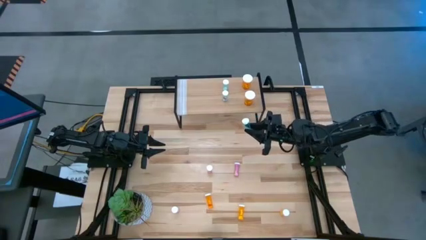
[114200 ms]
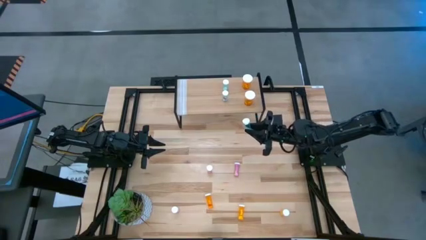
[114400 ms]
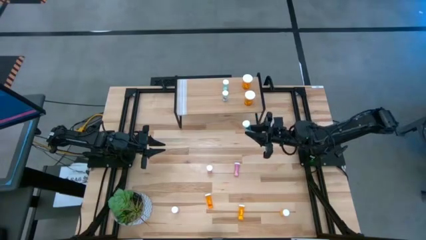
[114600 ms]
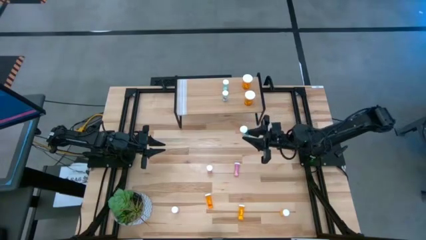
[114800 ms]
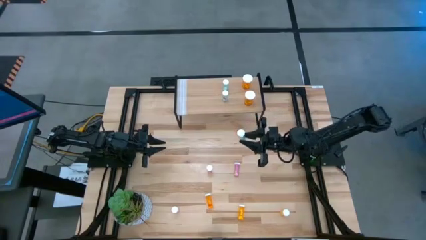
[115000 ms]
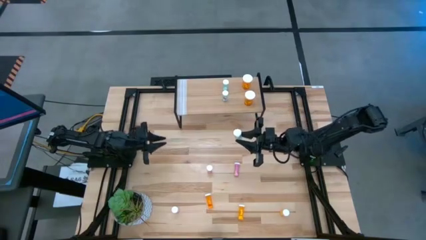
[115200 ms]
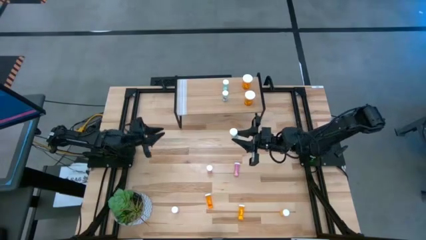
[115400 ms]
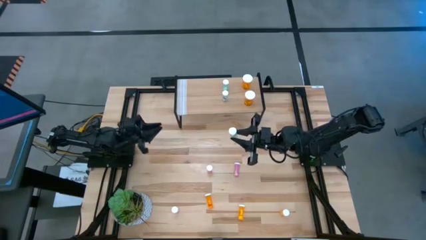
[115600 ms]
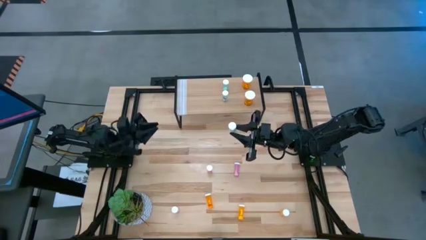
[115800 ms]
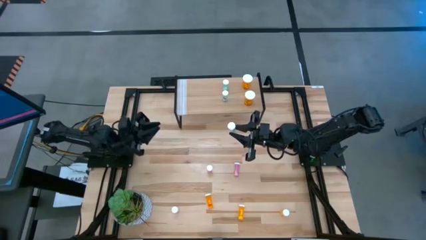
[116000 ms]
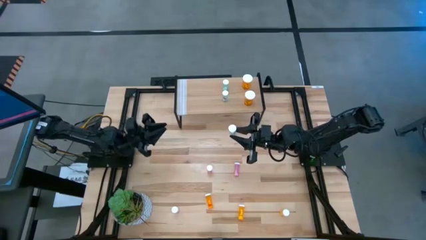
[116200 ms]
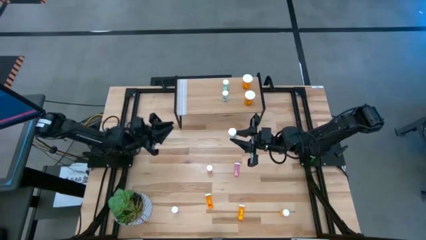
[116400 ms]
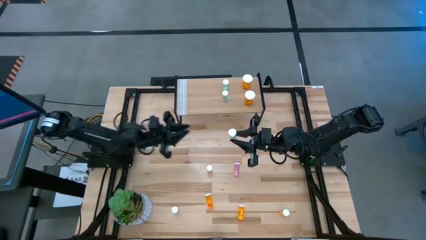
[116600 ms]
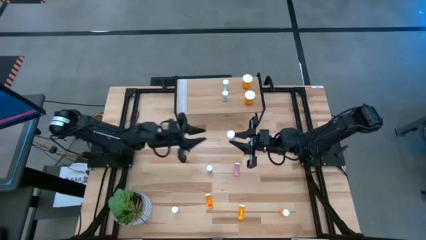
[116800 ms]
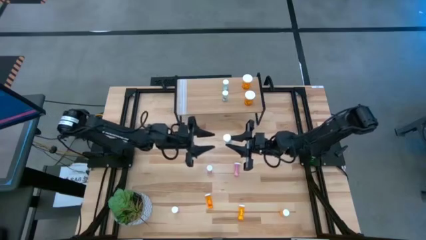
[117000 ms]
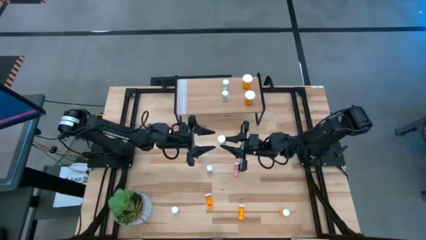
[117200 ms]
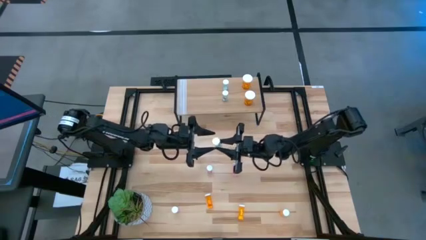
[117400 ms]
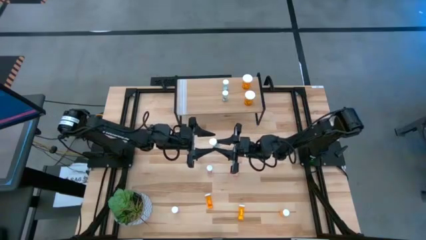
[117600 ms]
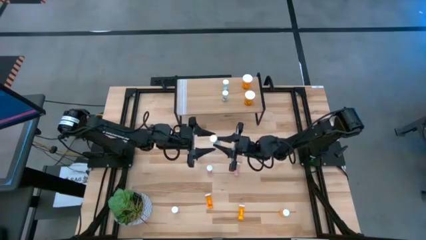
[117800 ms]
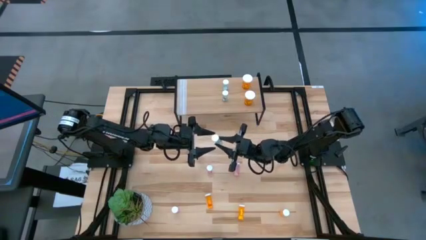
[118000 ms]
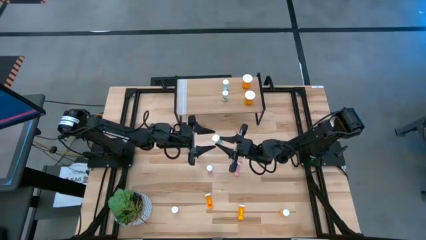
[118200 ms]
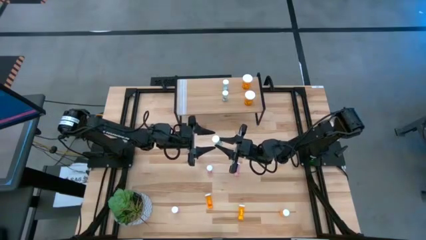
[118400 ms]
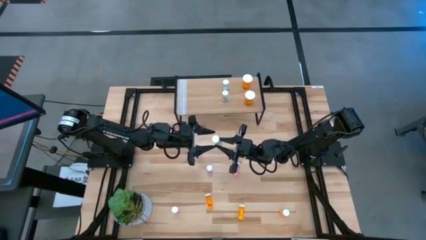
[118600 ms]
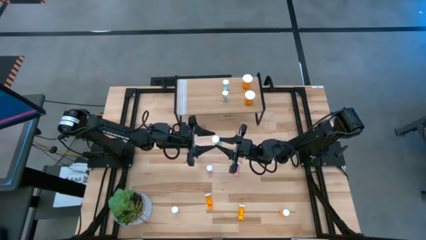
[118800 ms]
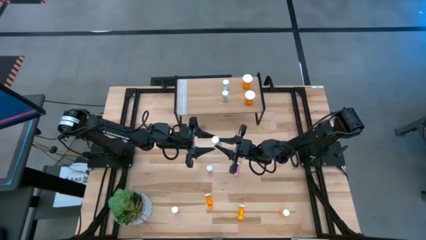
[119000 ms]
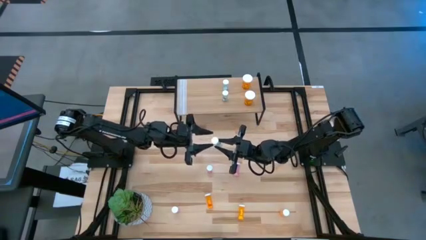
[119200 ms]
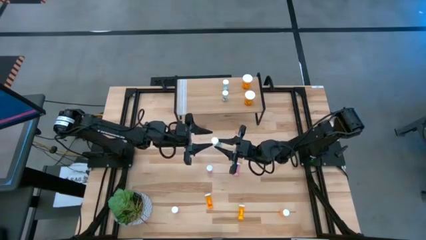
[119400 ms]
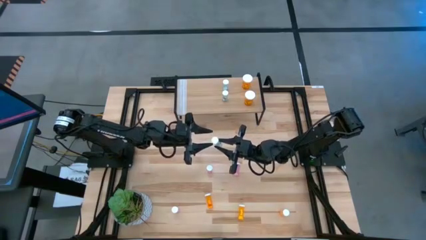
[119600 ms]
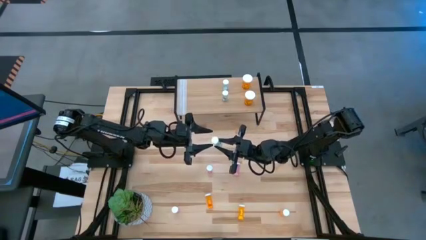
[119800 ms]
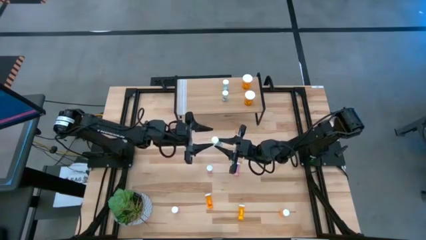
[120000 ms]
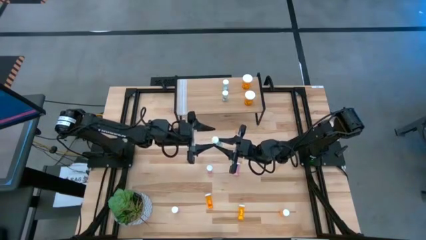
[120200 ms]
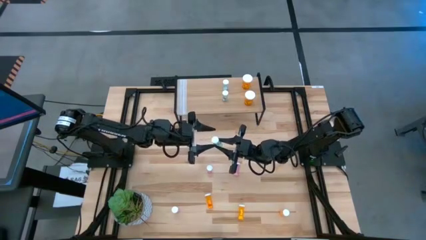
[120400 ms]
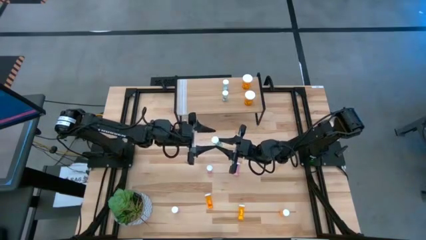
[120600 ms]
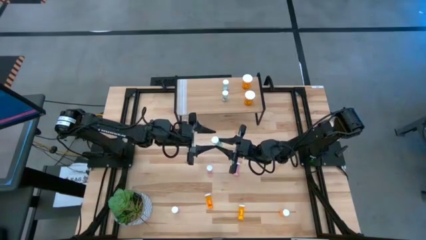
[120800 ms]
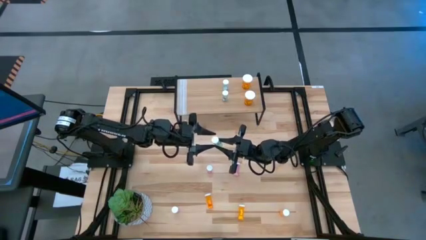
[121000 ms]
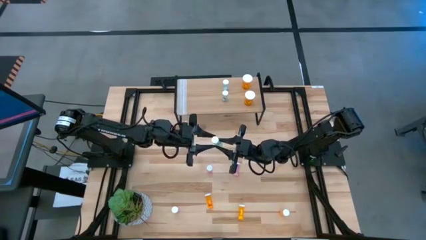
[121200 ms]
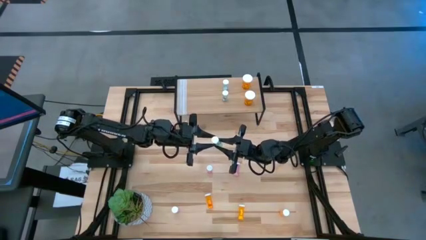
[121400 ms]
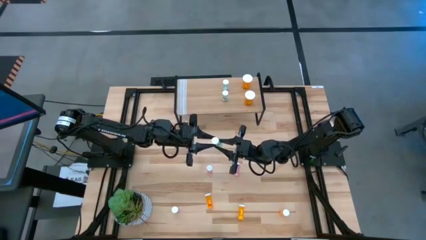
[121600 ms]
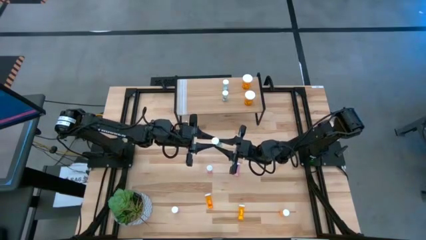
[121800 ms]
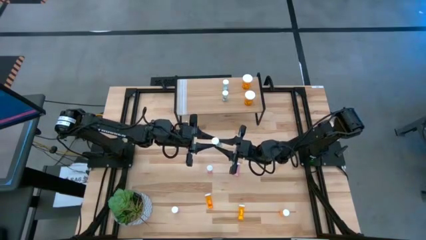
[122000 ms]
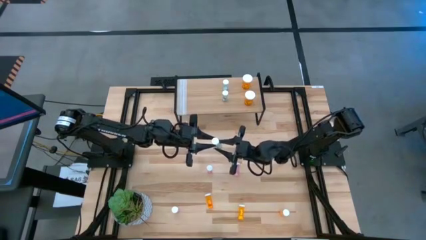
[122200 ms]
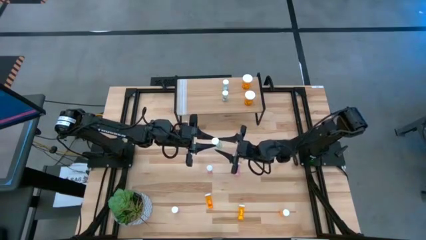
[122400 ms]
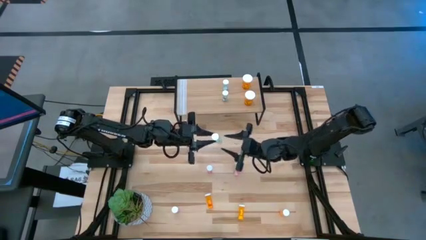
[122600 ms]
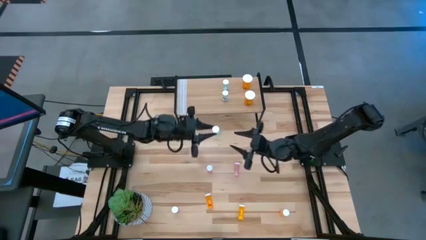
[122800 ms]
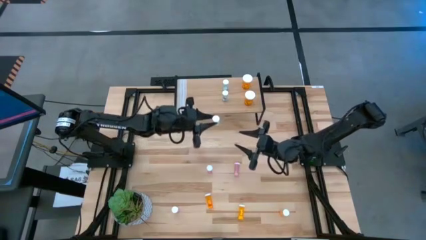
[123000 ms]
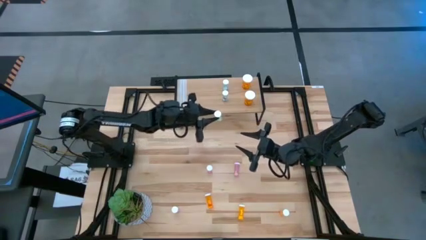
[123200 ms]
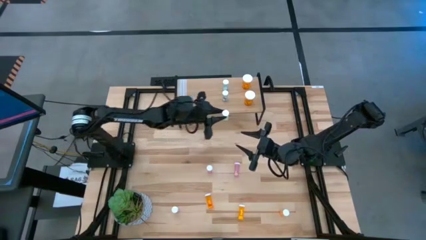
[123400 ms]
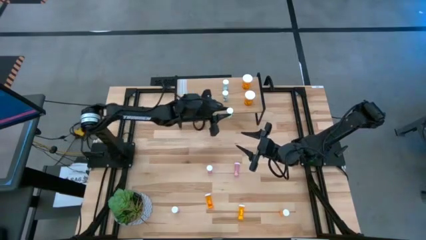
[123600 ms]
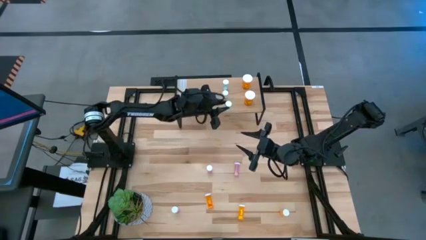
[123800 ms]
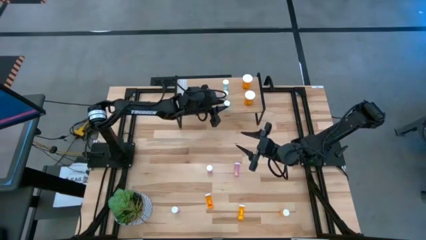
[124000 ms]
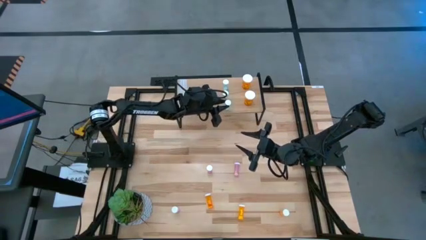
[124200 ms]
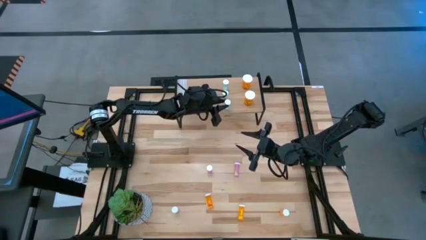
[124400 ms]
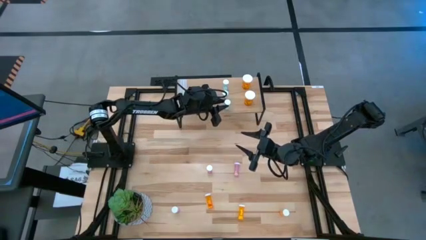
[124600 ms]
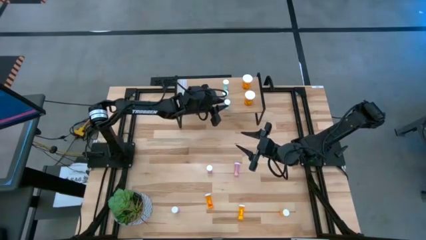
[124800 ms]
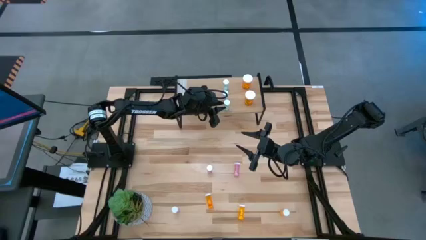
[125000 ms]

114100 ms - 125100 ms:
Task: Pick and place medicine bottles onto shelf by color
Put the small blue pill bottle on the shelf aligned with the other small blue pill bottles

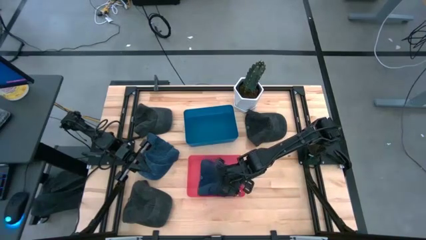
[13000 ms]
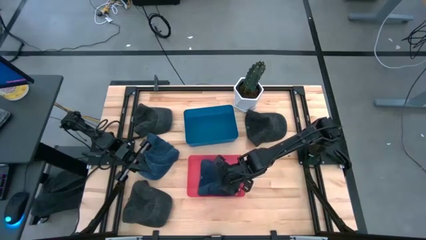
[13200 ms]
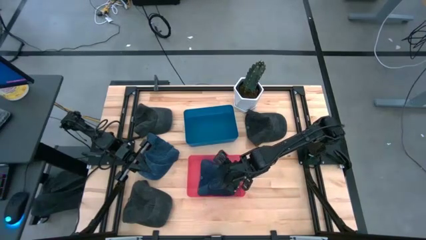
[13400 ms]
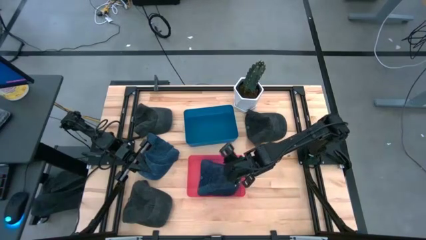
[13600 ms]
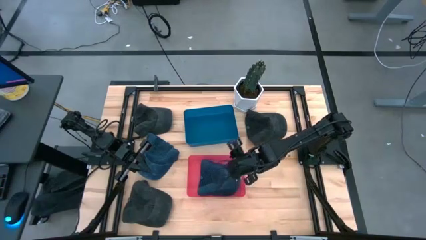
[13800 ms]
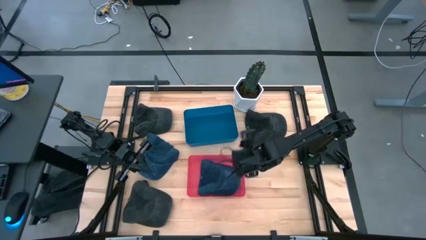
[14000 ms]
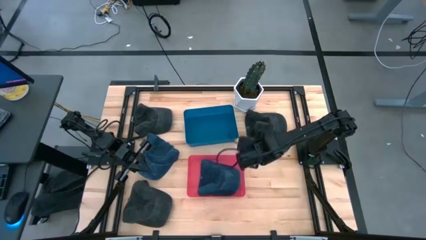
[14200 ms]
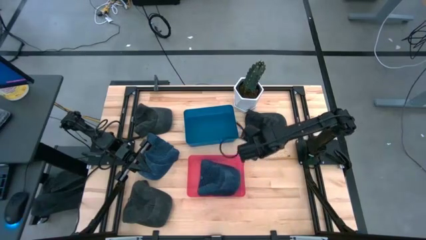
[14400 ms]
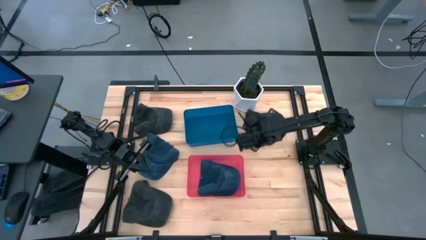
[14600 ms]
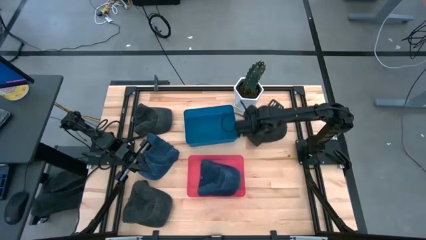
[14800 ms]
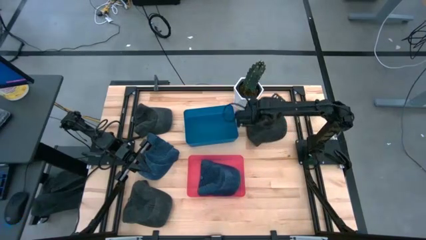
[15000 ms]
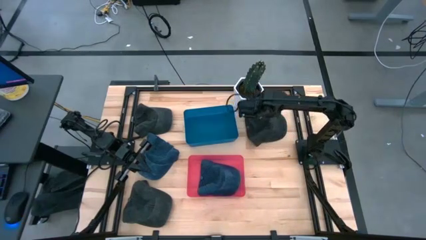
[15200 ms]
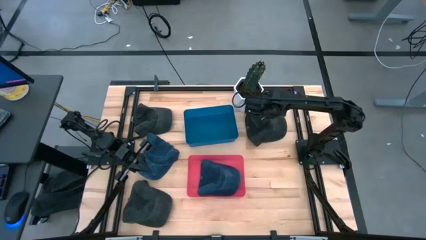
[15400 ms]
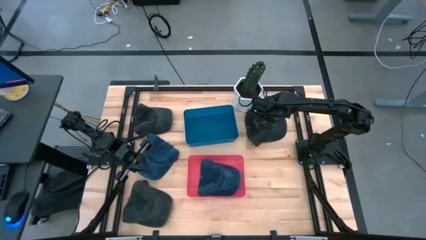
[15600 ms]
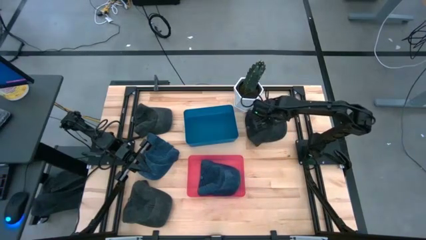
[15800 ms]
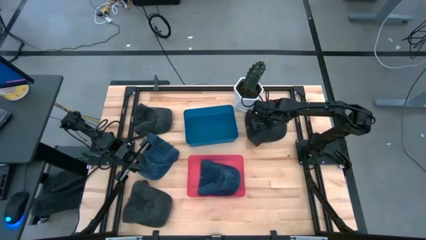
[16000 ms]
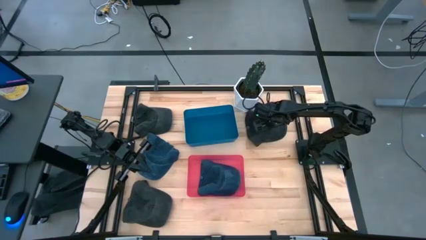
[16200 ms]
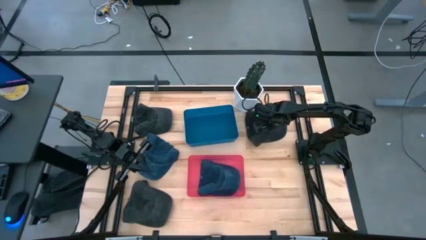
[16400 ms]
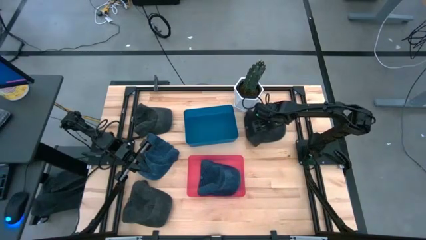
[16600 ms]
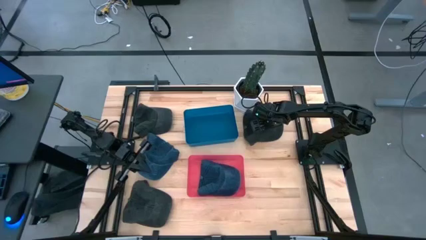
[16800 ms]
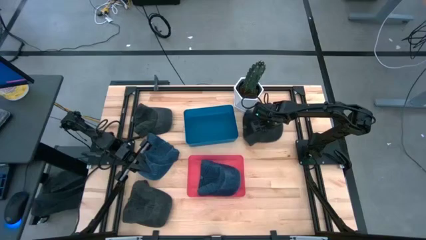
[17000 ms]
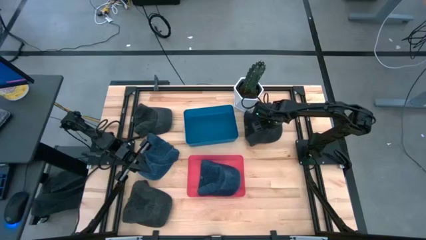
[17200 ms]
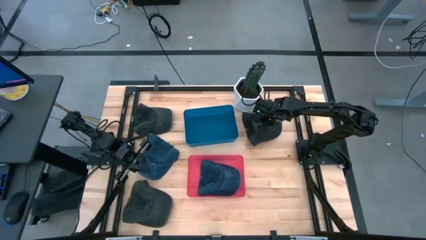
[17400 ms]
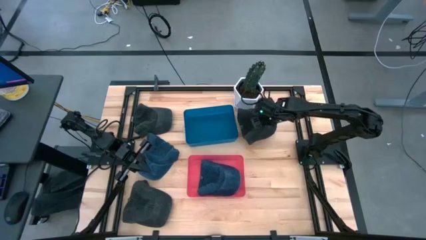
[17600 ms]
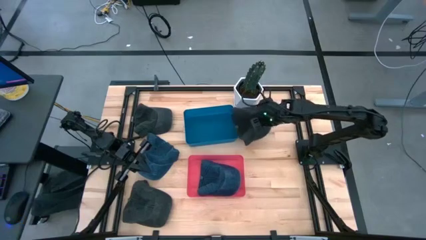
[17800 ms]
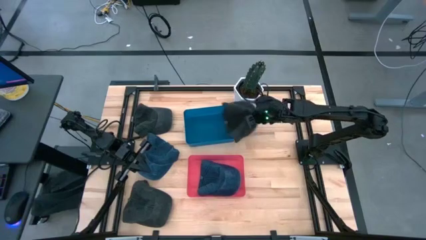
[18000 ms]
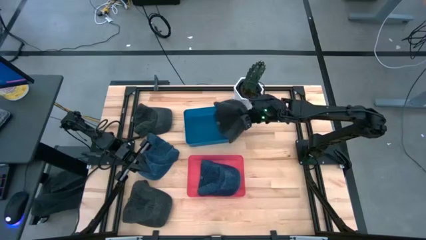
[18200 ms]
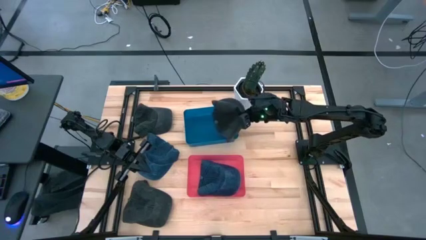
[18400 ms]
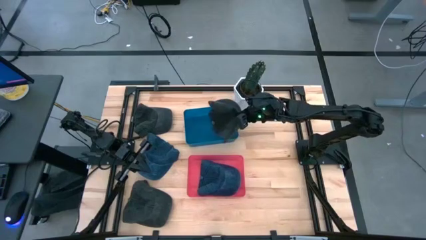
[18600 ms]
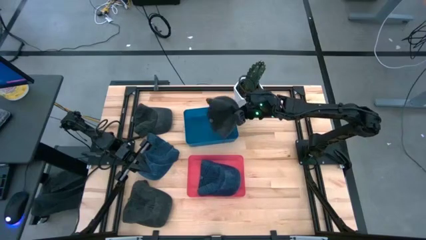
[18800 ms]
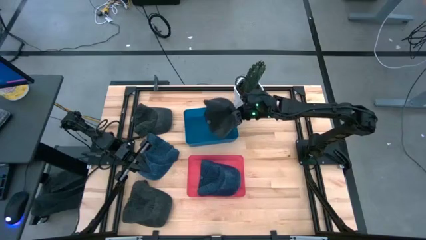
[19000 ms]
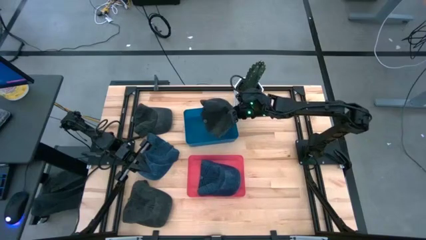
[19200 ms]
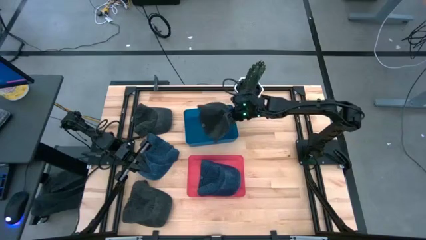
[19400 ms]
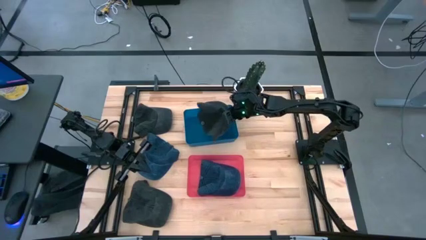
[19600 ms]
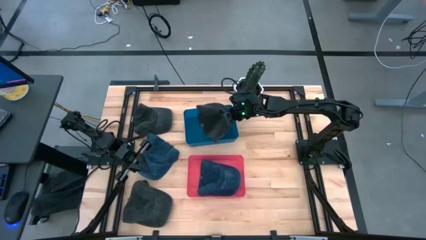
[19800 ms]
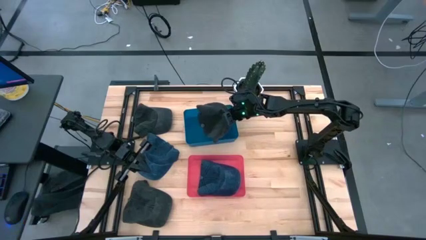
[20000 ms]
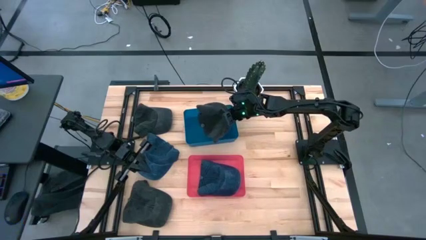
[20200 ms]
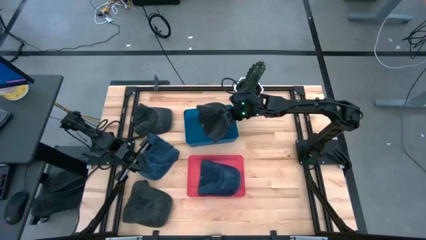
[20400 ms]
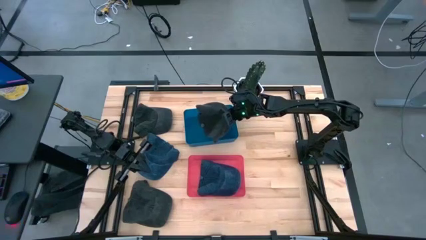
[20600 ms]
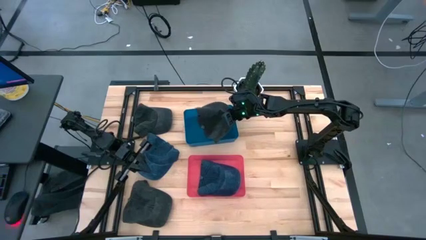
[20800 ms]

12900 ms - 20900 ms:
Task: Pick & Place hat
Put the right black cap into the blue bin
